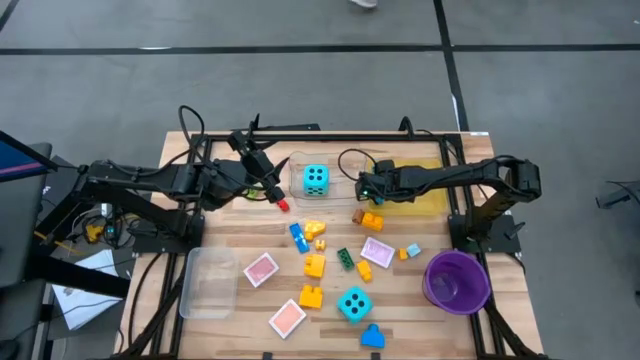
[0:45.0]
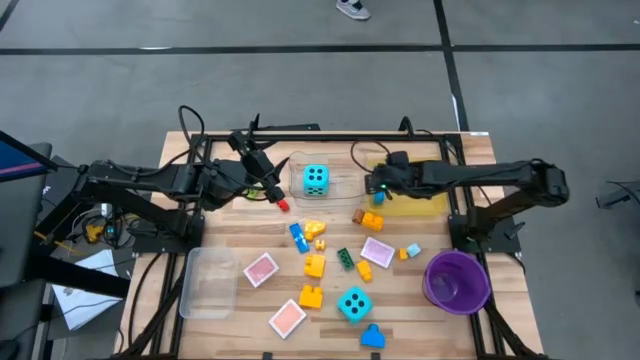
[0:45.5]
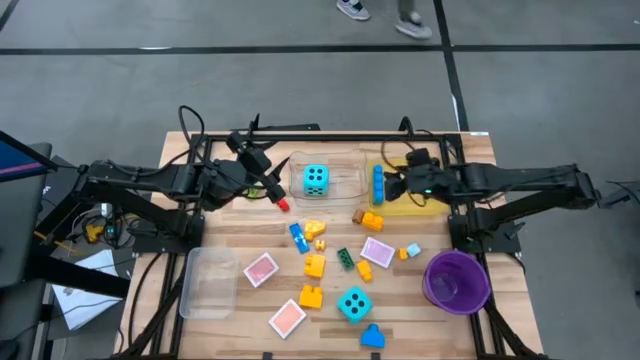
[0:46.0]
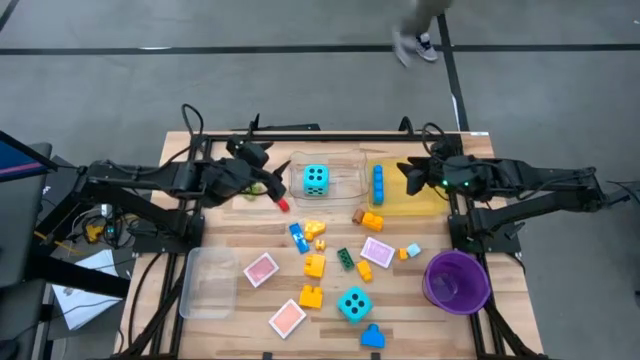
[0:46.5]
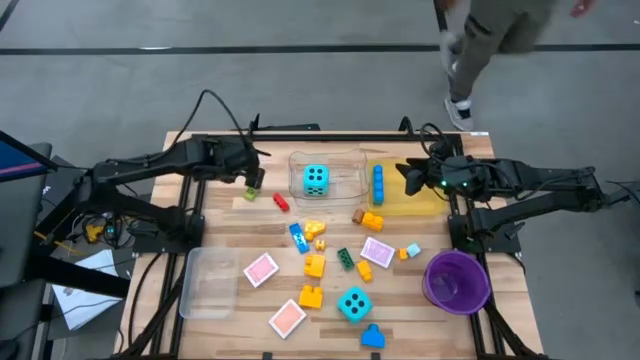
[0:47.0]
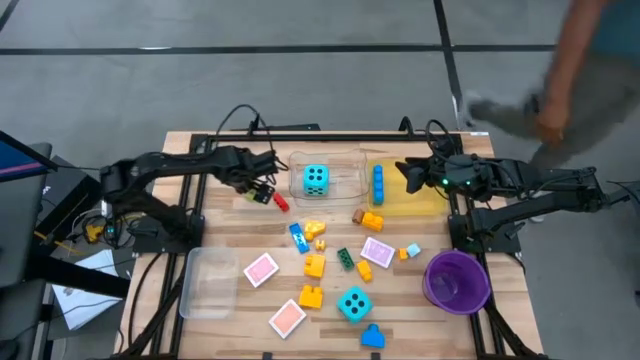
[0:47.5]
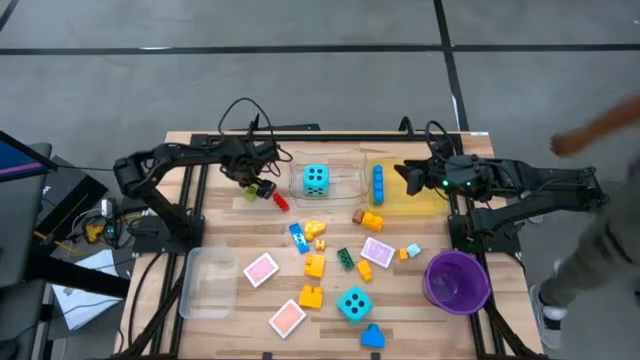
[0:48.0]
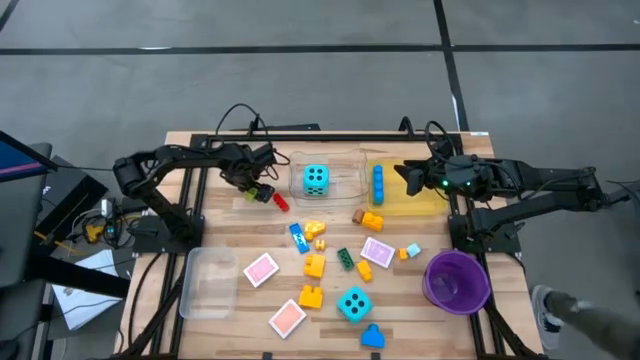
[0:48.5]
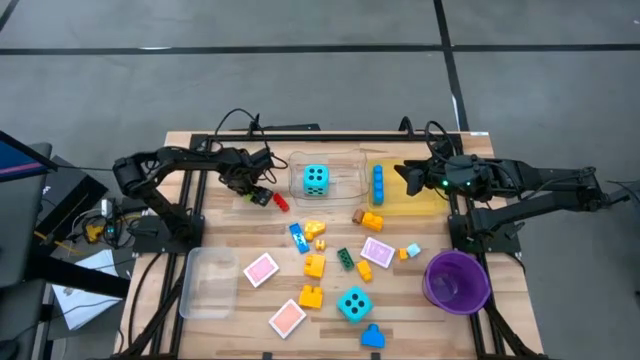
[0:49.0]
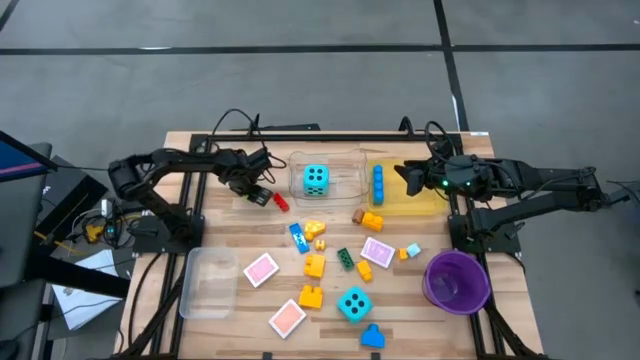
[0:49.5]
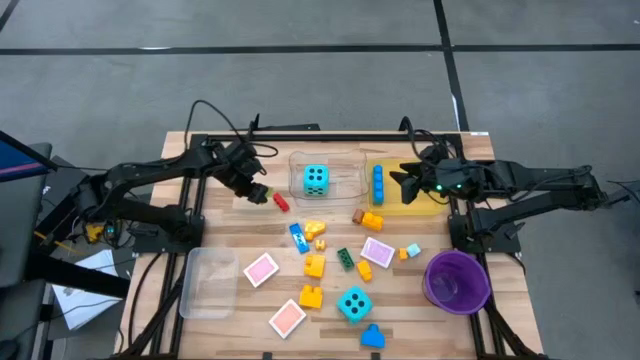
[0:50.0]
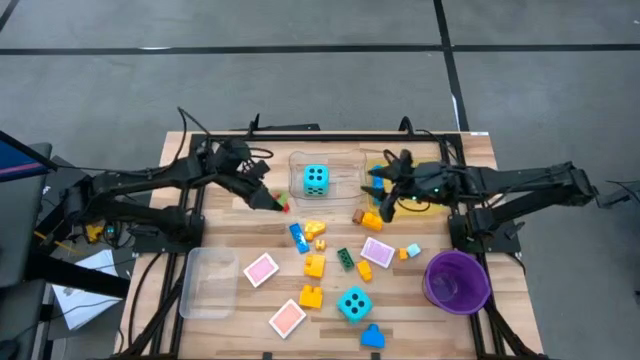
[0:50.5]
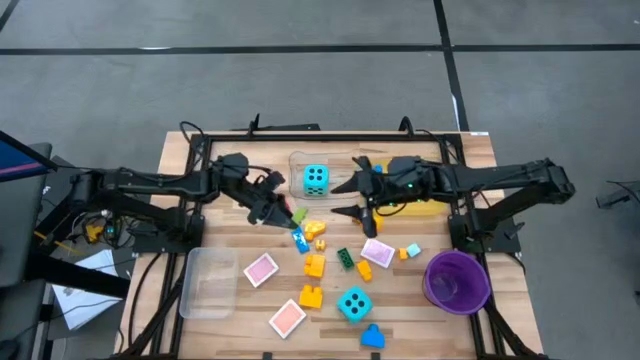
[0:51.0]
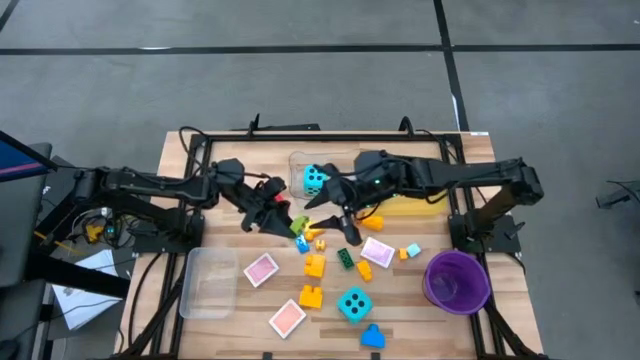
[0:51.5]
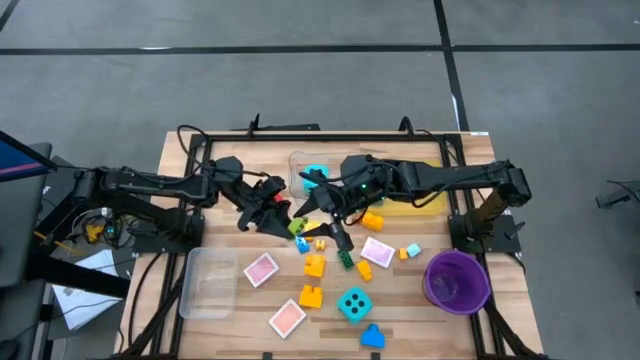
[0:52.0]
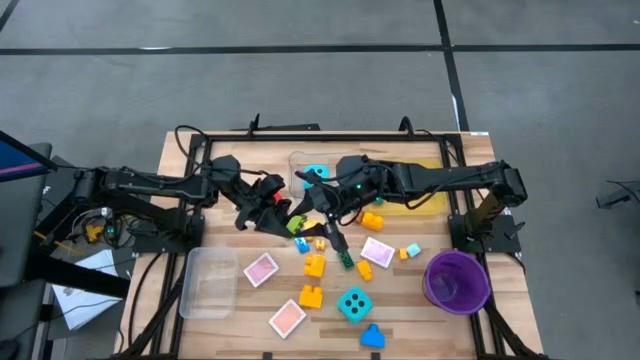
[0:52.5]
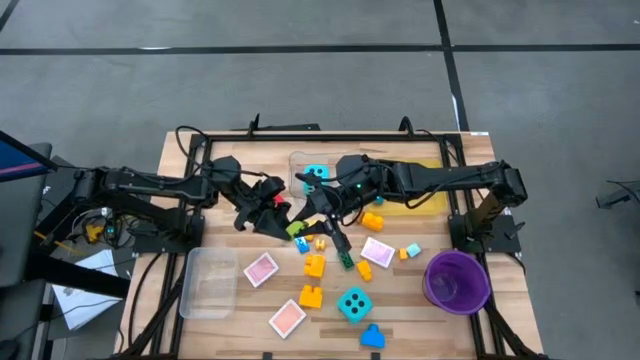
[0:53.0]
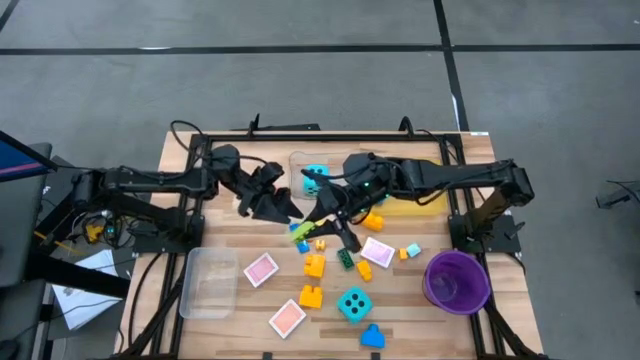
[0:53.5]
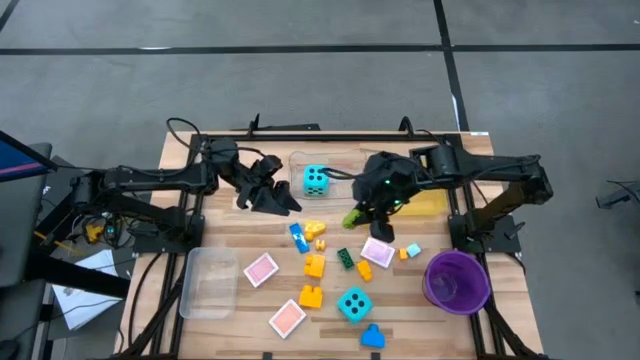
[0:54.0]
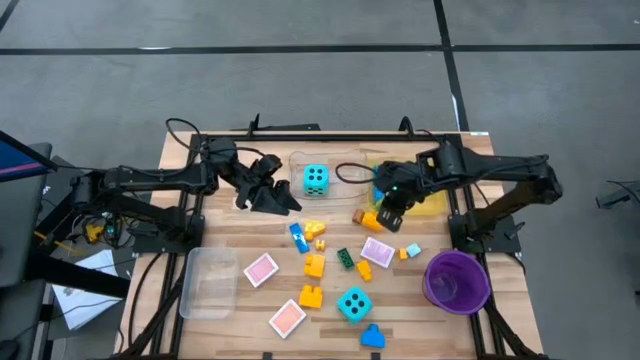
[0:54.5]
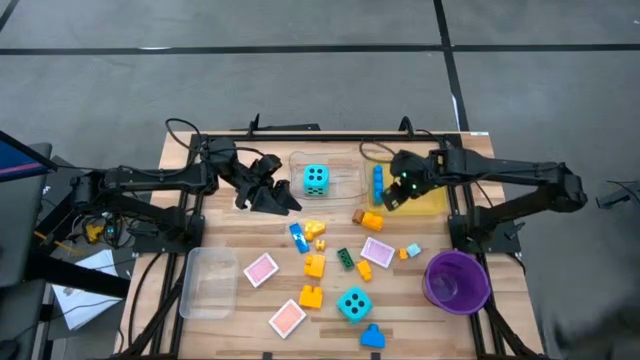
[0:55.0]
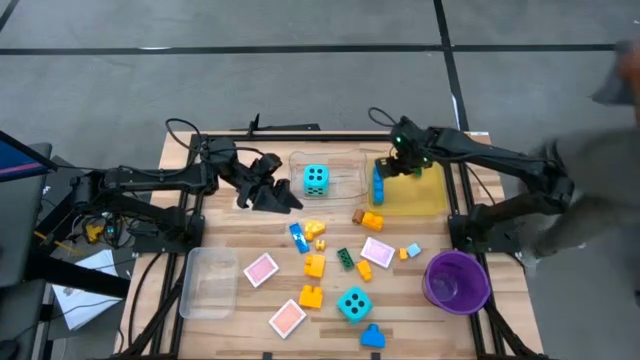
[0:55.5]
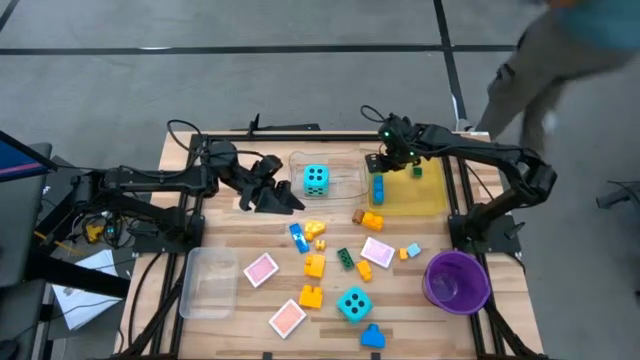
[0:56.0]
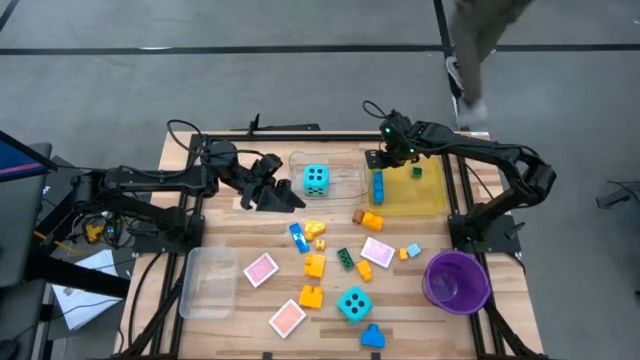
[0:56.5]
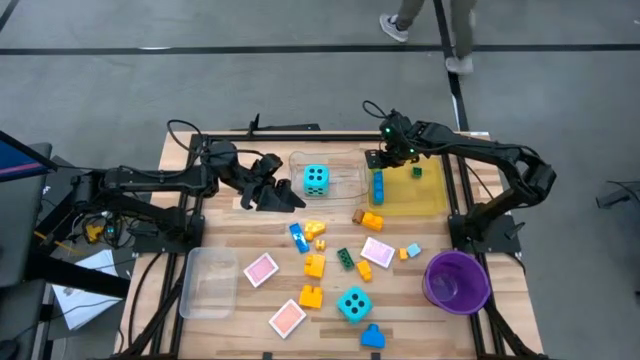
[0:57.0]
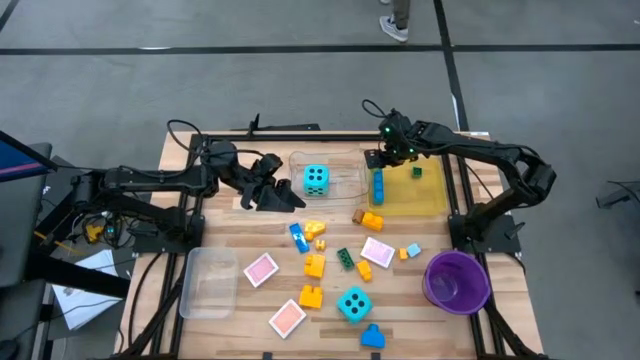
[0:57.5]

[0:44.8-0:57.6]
Task: Pick & Place Toys
Put the light green game piece into the yellow bin

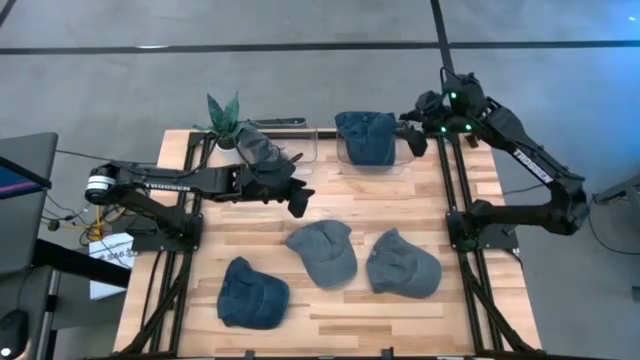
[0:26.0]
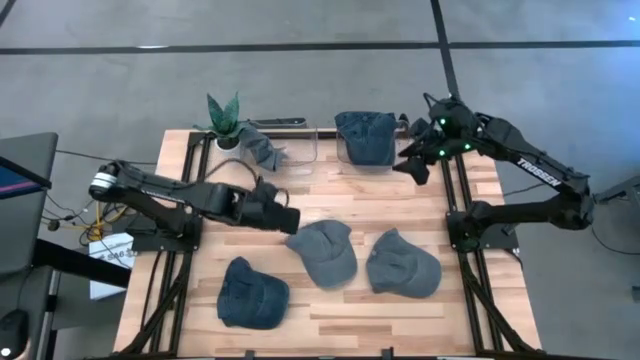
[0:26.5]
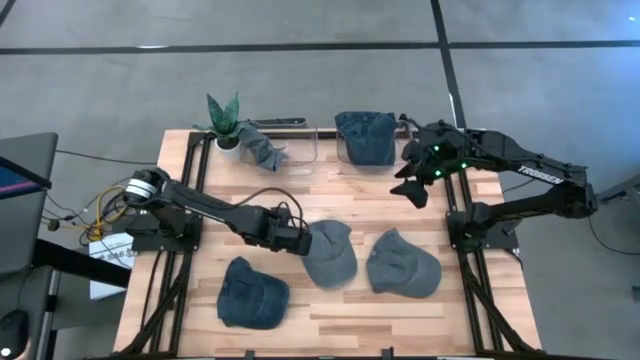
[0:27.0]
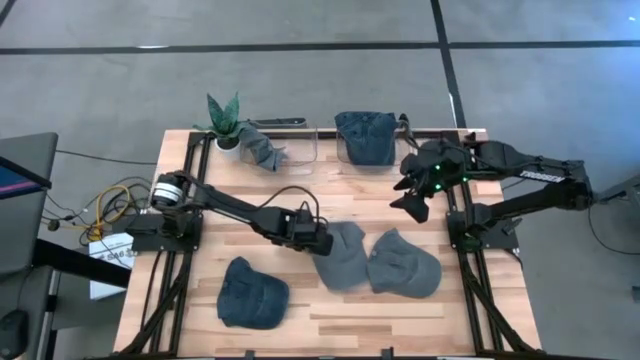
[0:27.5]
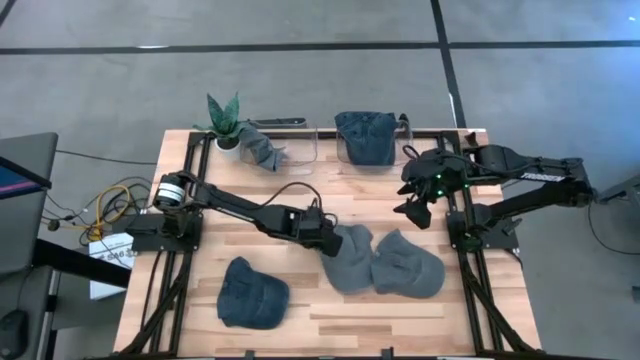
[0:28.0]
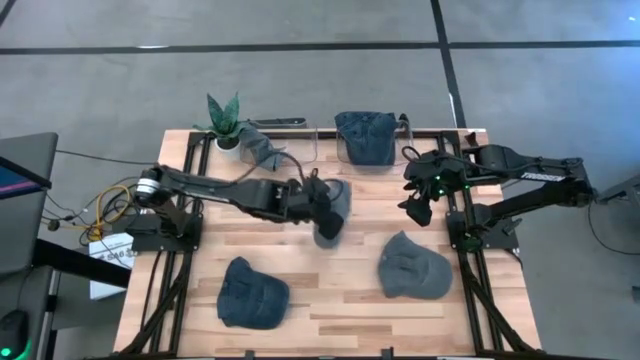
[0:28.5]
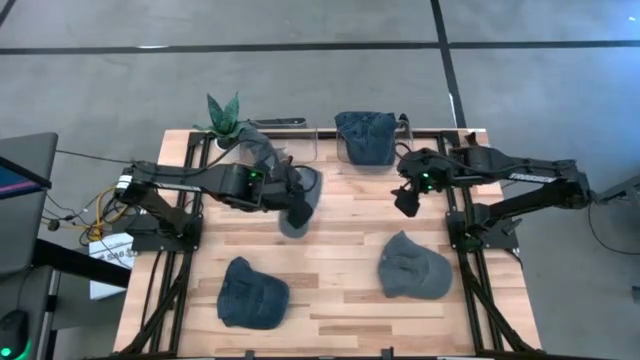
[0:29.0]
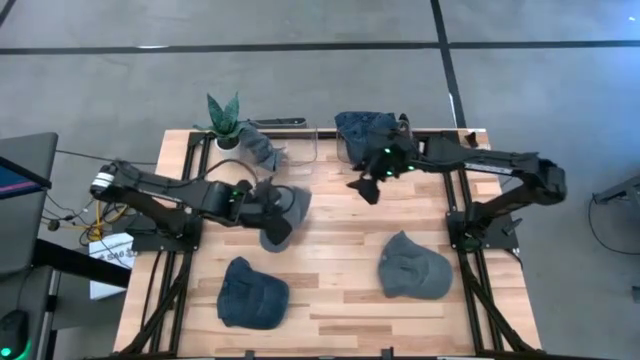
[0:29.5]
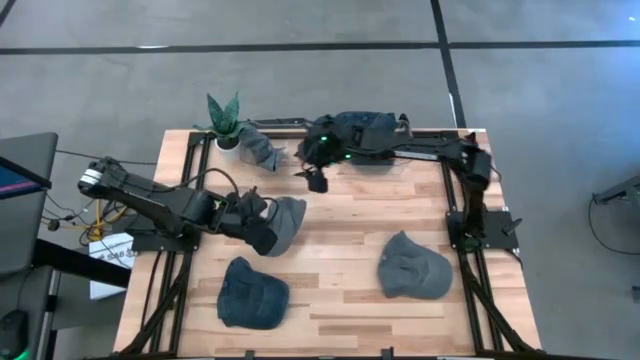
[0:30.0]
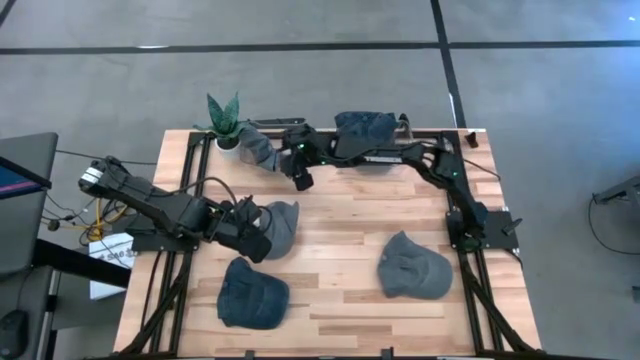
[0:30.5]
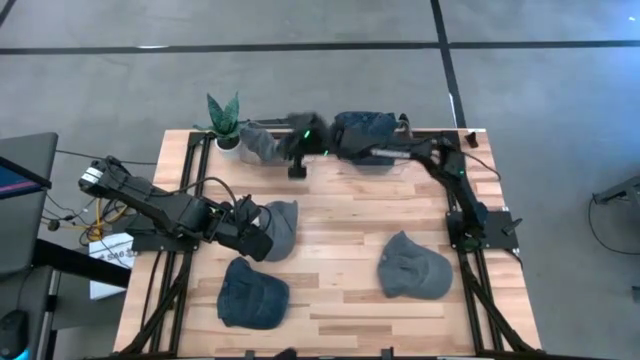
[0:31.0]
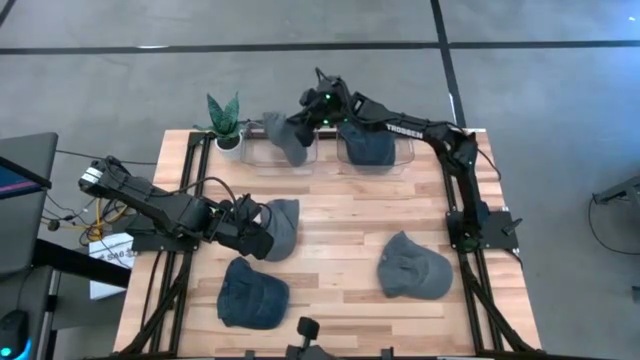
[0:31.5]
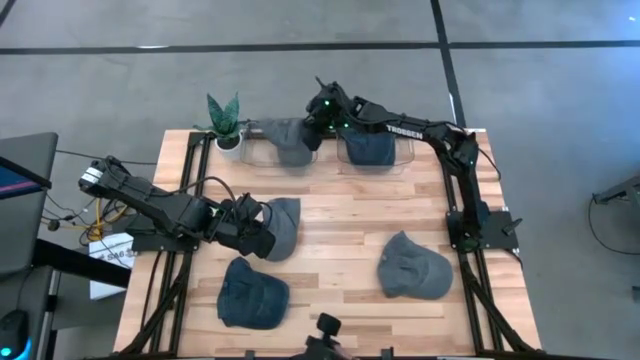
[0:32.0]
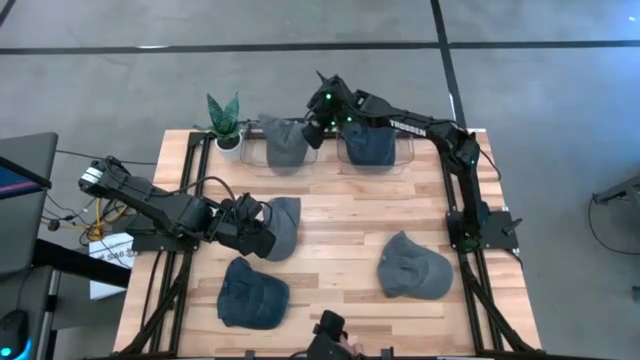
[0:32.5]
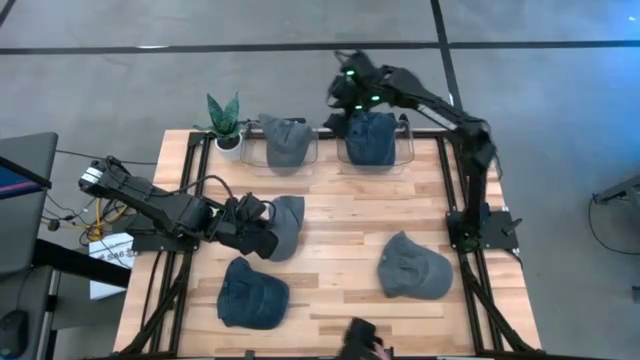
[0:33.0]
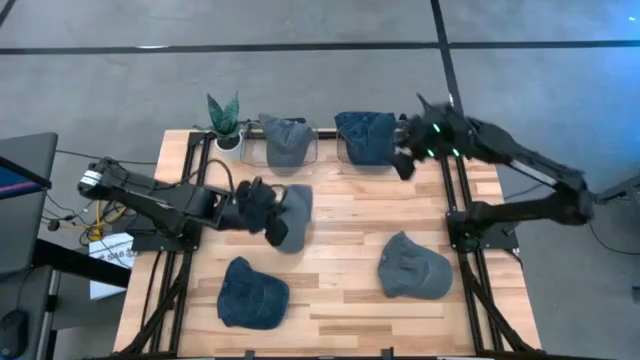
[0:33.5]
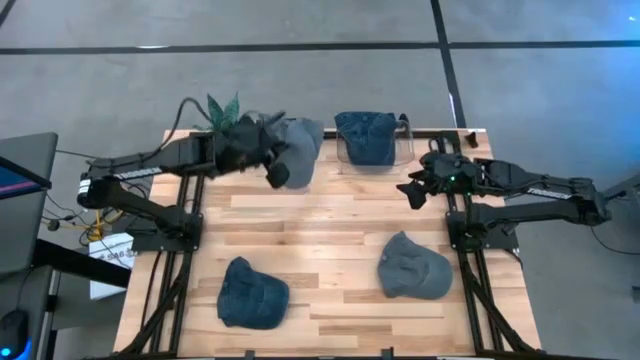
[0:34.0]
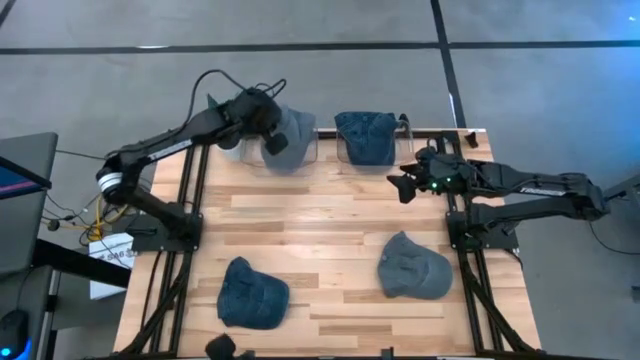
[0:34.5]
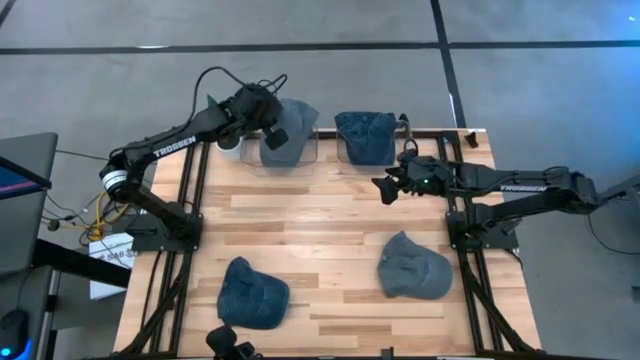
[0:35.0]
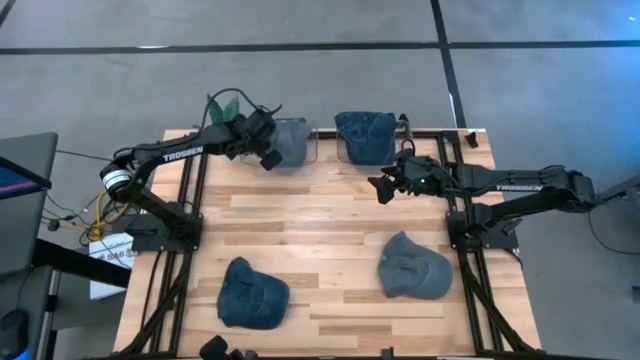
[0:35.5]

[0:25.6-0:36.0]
Task: Pick & Place hat
Put the left gray cap into the left transparent bin
